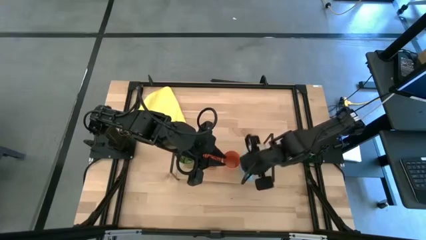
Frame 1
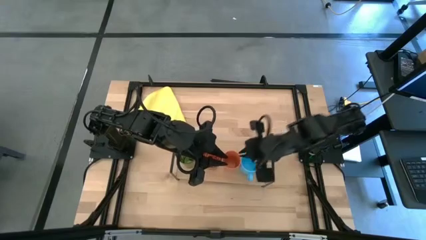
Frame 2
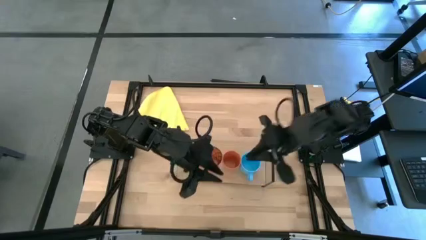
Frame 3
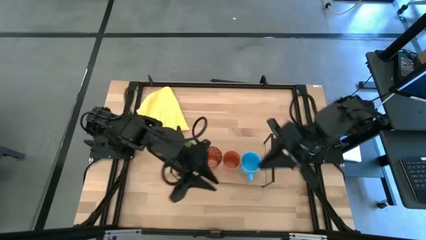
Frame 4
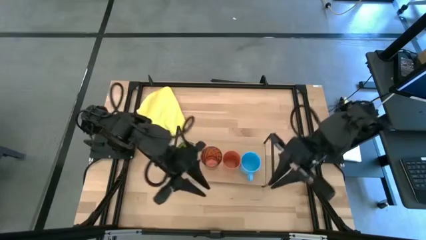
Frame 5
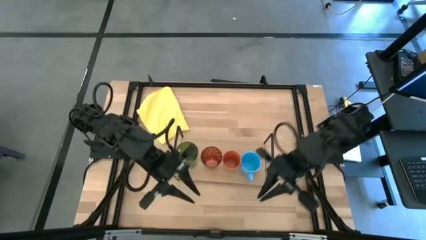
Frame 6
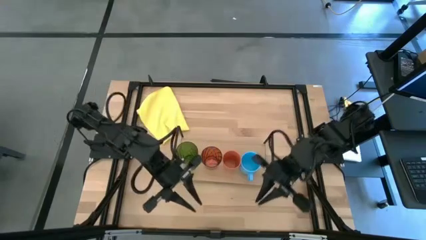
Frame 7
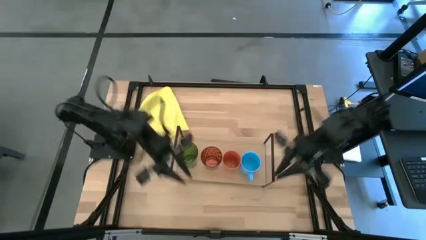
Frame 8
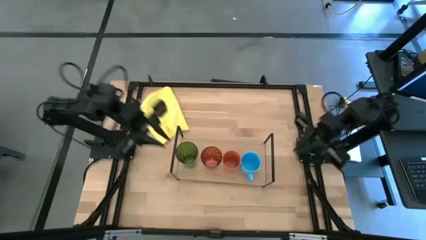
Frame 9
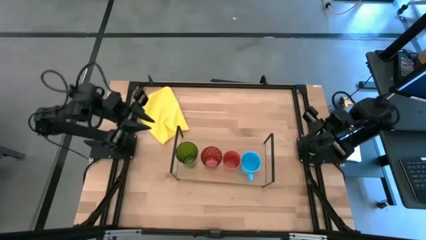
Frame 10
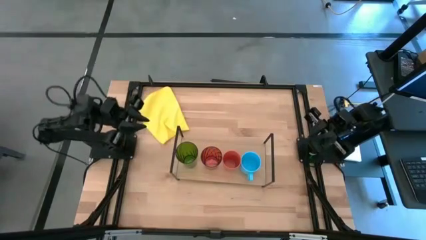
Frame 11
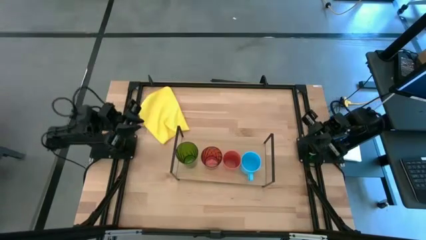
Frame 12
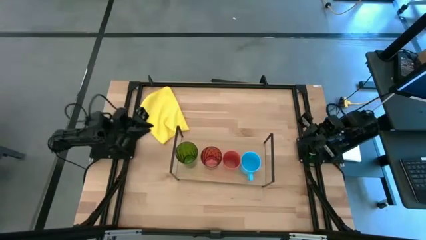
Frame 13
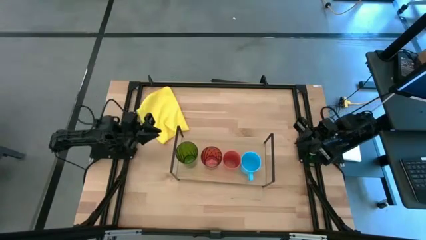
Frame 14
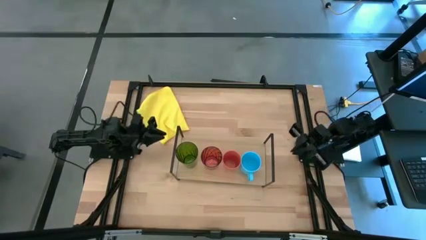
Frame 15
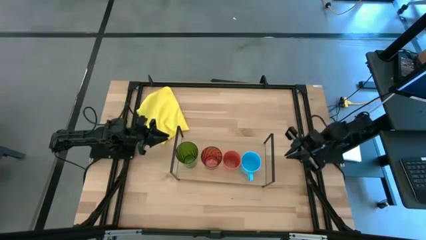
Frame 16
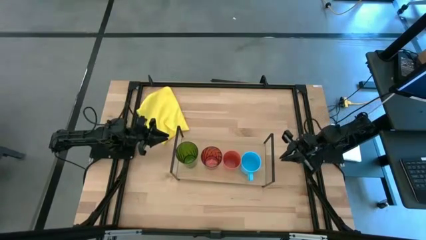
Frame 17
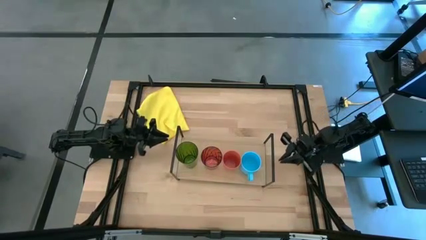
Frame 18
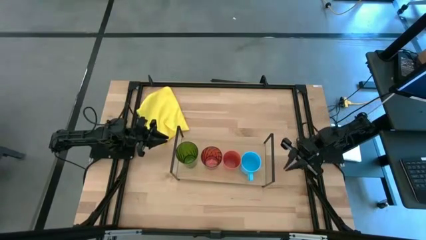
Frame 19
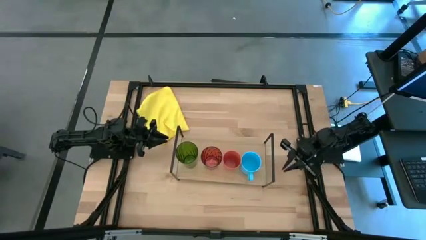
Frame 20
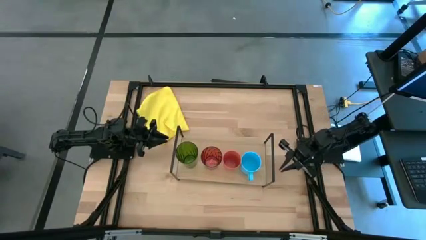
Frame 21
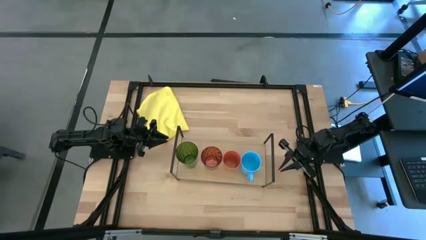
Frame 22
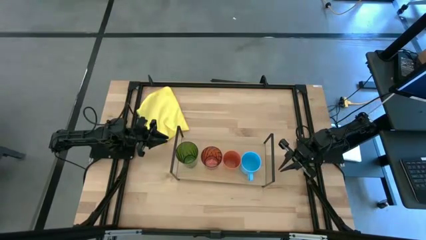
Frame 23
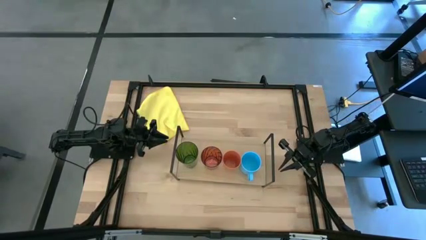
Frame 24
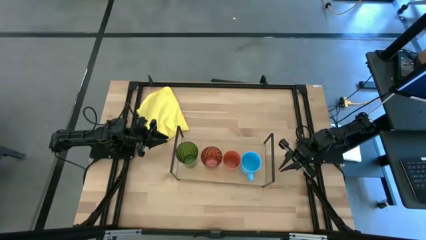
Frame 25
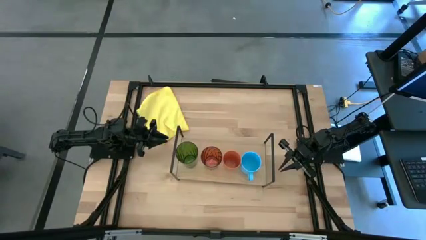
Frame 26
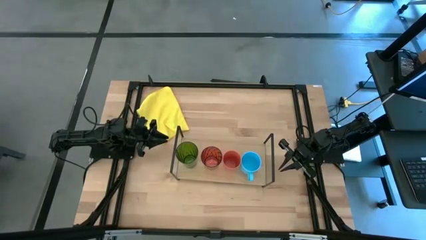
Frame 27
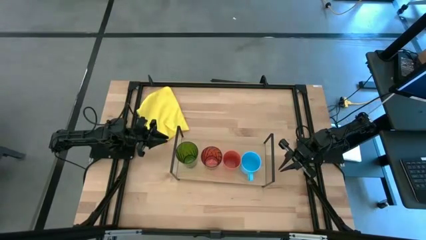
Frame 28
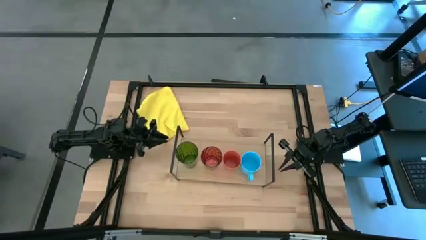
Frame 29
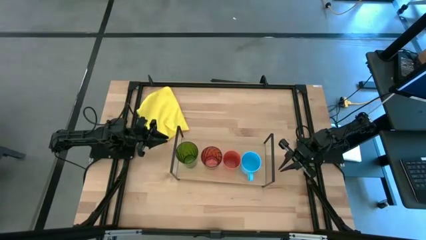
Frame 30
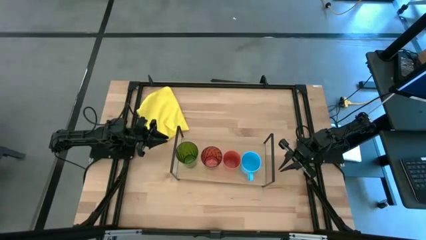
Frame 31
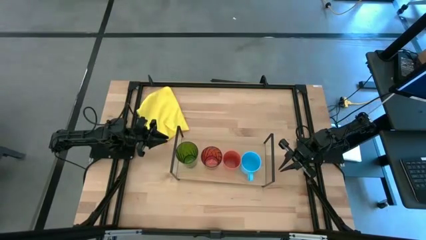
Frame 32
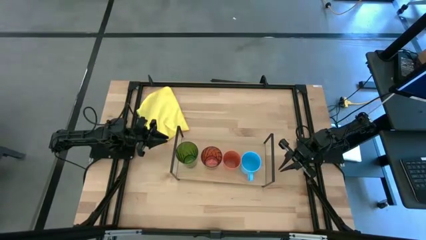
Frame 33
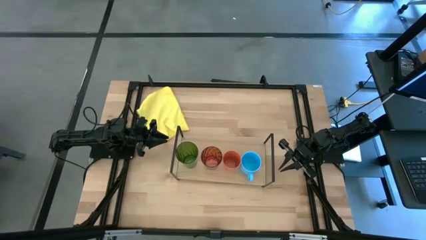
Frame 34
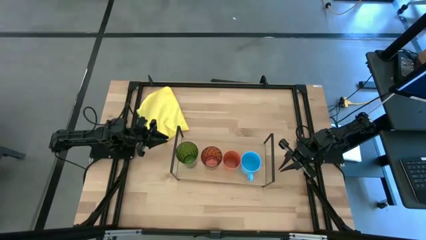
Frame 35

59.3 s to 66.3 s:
Task: Stack small to large cups/mugs on shelf
Return to Home Position

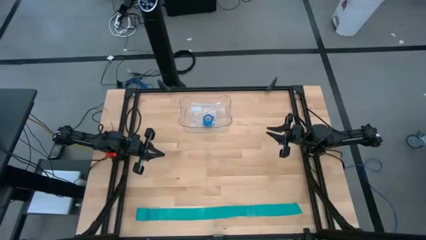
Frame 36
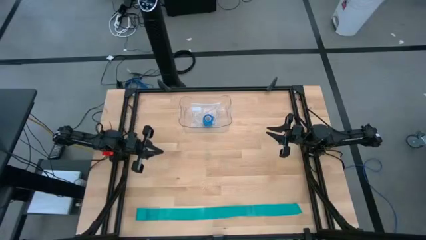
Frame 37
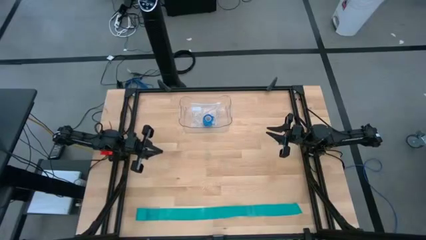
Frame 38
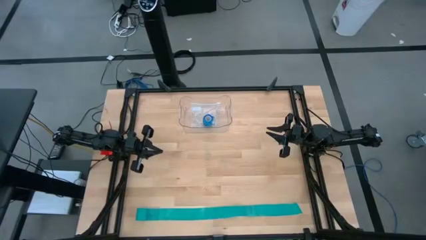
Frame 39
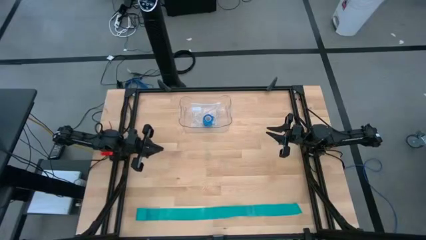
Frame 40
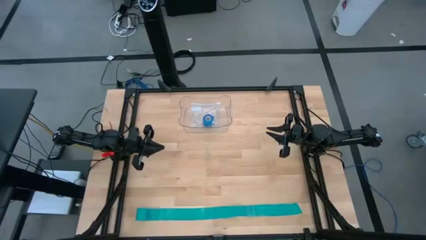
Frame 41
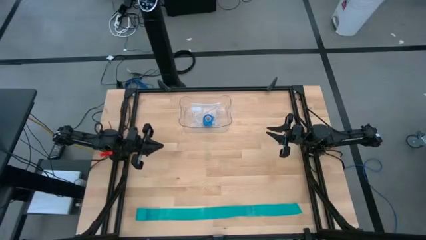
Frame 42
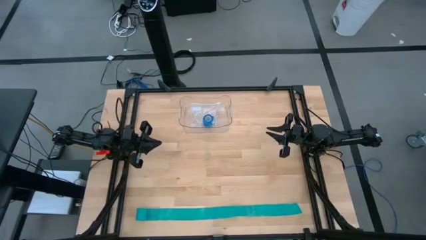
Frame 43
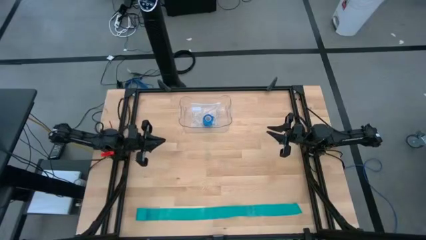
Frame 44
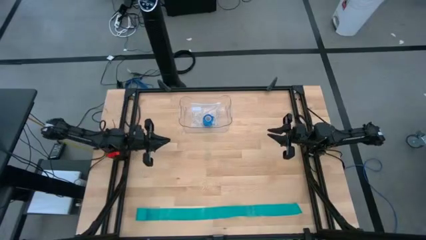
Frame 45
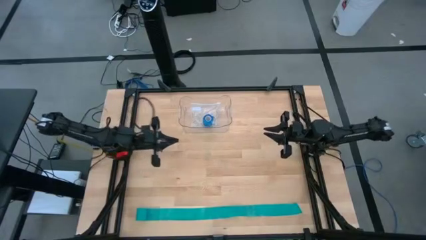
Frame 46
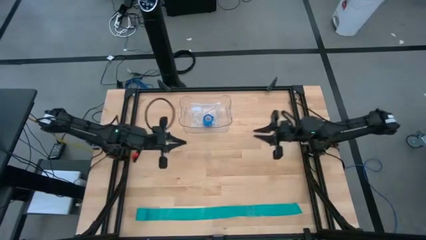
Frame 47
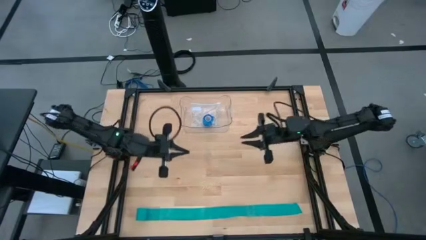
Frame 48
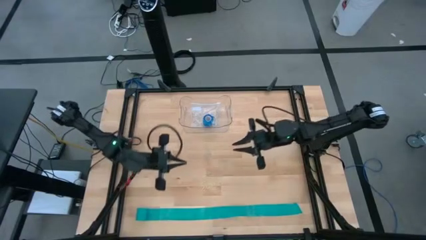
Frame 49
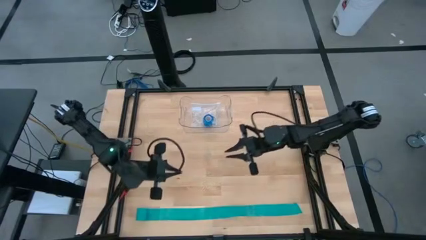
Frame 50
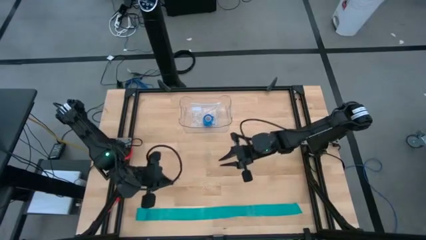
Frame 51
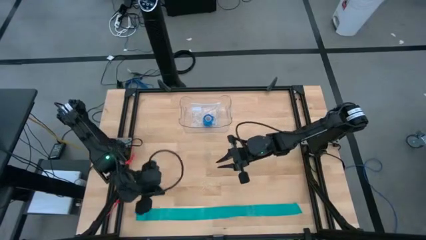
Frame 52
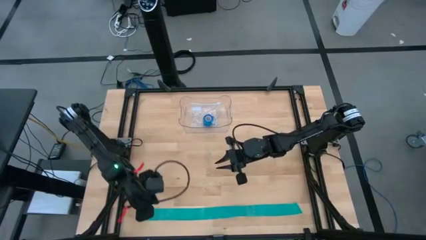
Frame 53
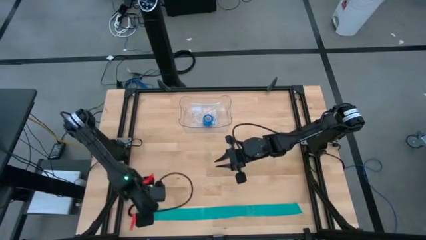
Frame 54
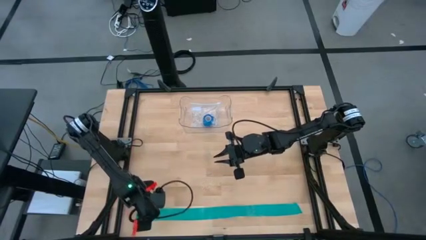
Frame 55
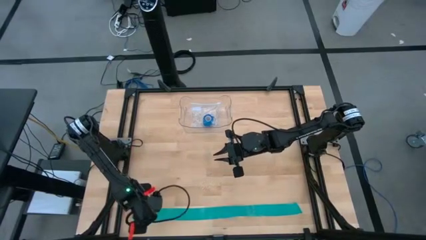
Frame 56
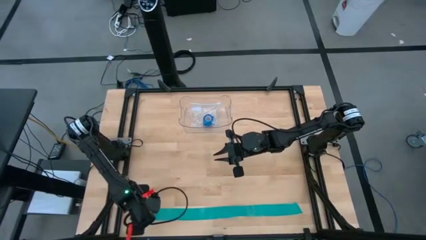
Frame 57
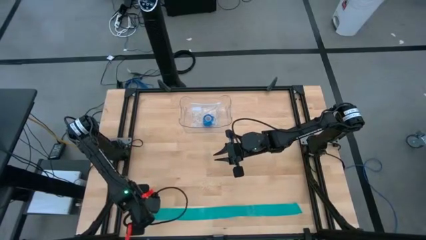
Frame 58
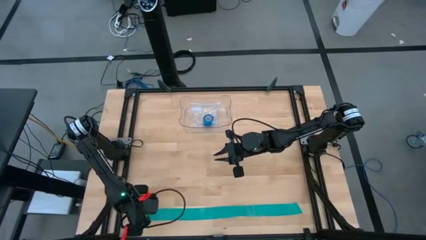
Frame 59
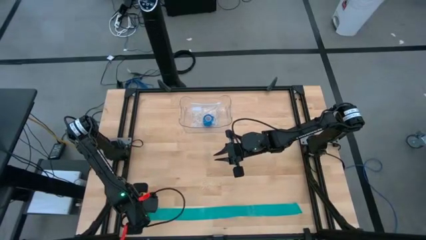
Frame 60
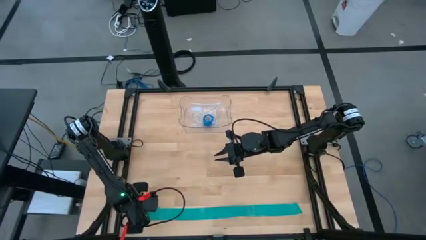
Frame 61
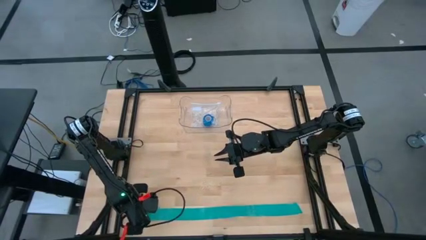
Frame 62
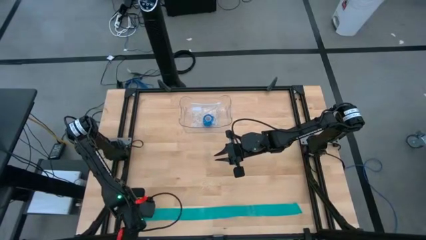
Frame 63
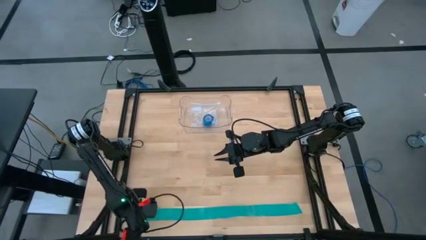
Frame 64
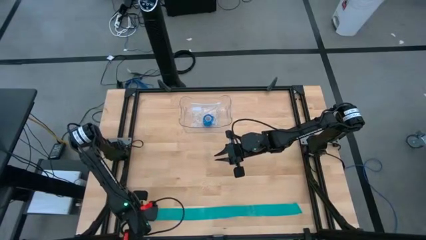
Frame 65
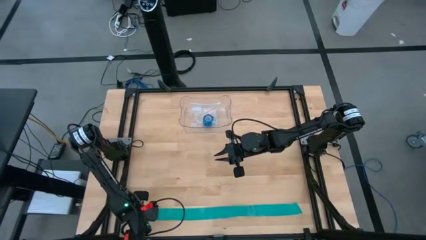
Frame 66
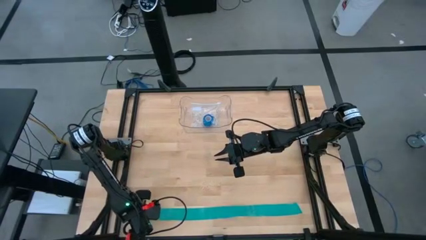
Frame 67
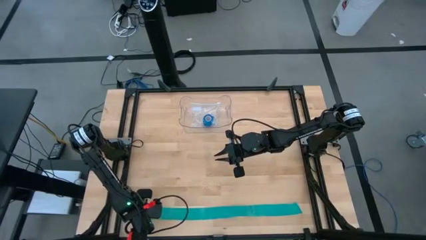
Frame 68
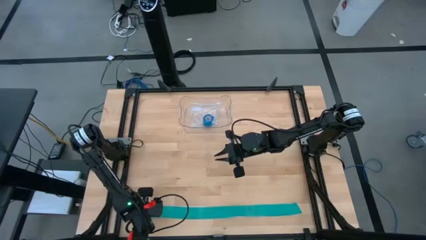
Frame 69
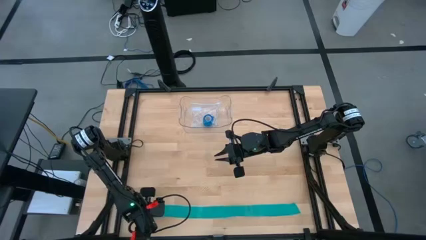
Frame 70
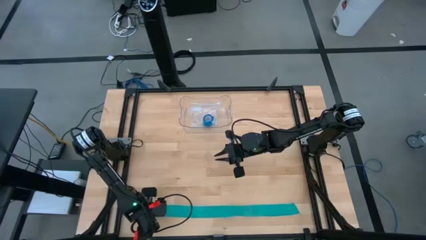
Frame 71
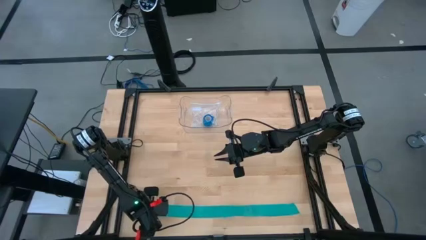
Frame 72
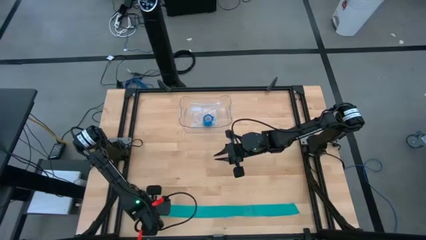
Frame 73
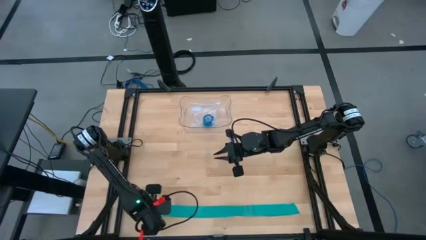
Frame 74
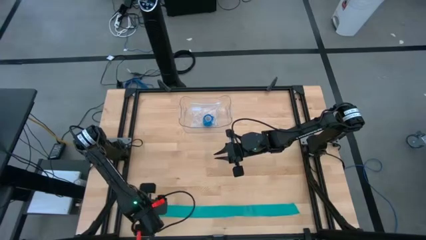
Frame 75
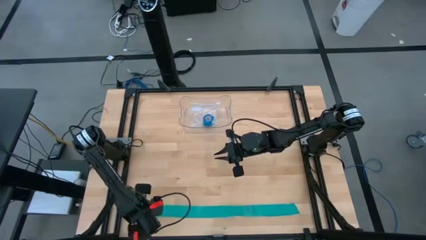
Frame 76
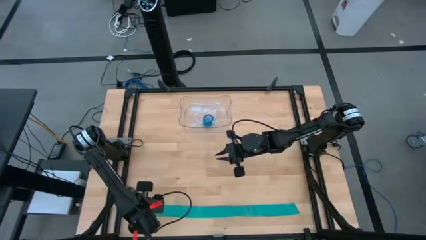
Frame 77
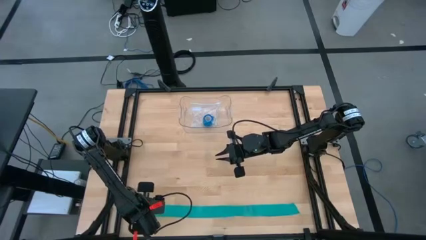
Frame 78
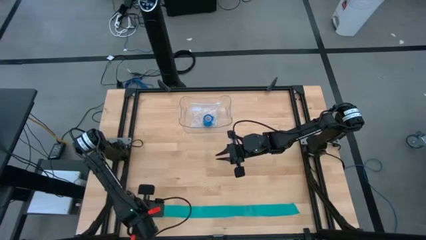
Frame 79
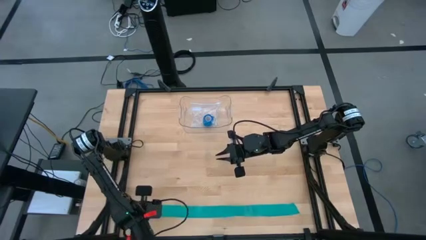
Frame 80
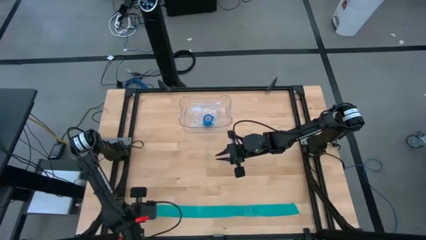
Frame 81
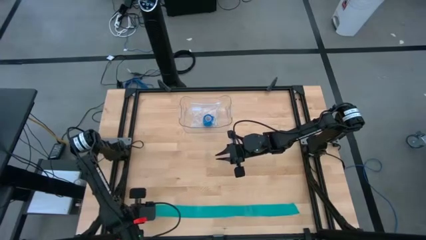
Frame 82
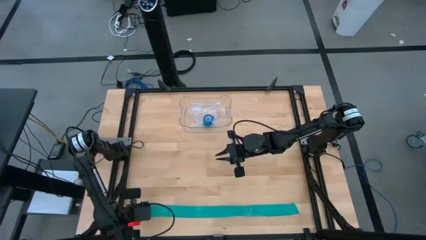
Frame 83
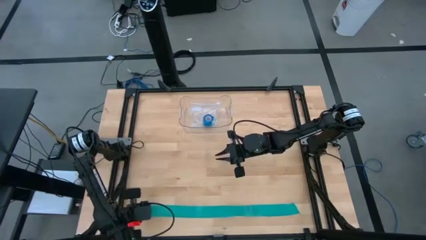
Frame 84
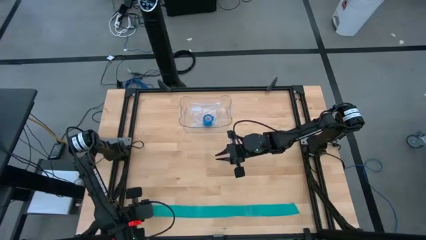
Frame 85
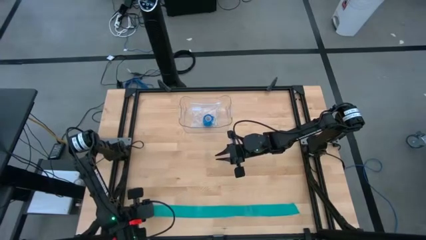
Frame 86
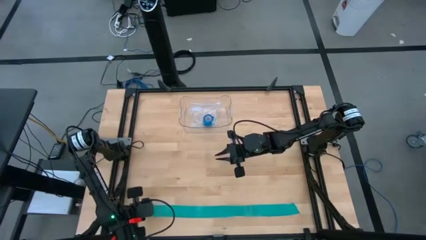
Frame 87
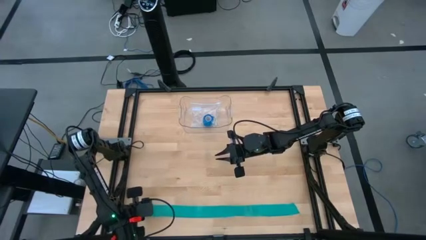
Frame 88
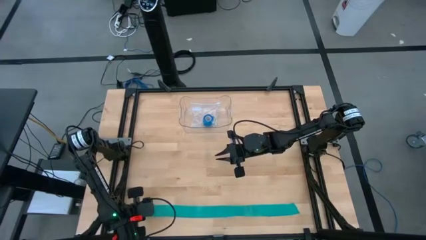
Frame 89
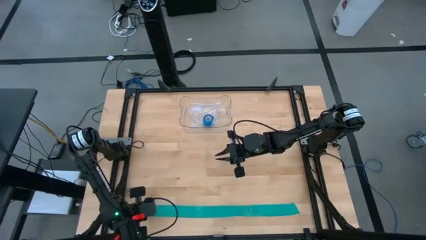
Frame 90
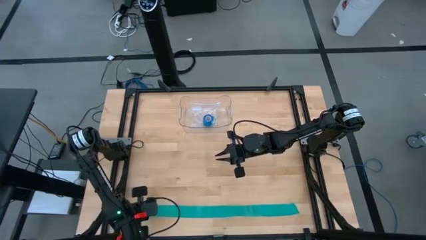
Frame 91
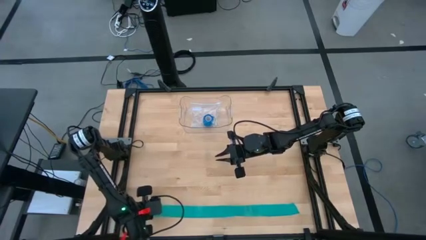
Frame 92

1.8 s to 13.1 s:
Task: Roll bandage
Roll the green bandage
